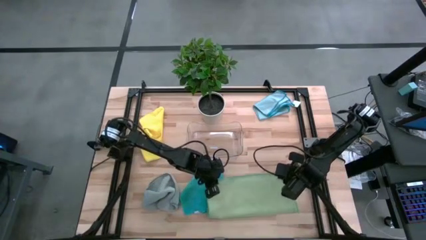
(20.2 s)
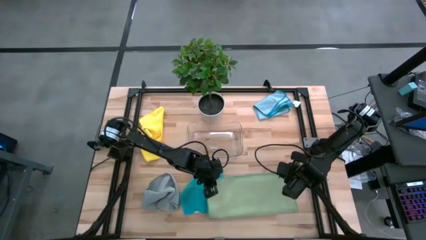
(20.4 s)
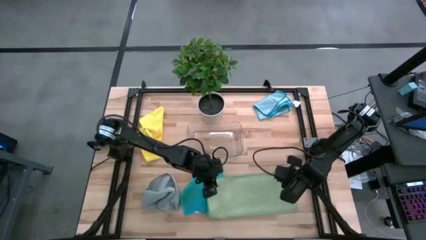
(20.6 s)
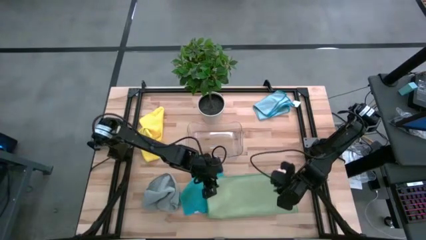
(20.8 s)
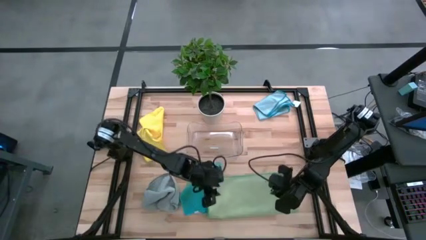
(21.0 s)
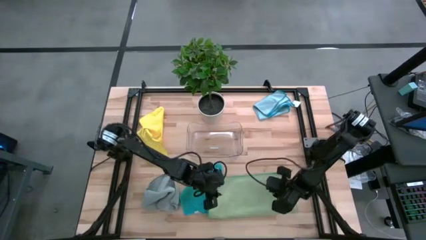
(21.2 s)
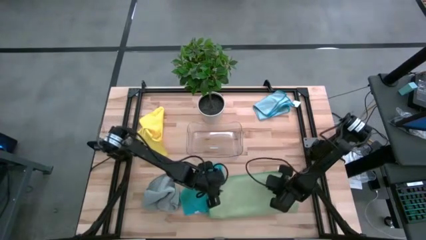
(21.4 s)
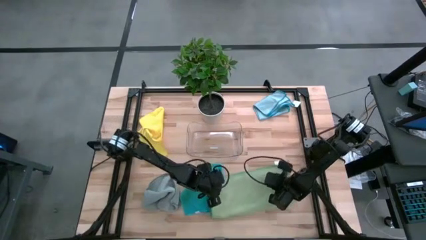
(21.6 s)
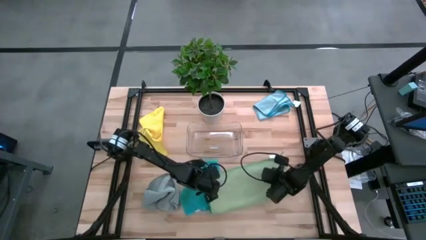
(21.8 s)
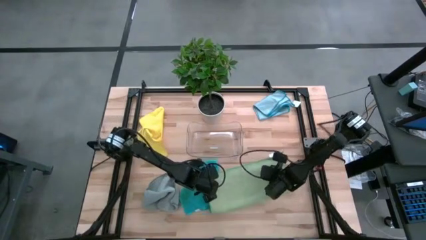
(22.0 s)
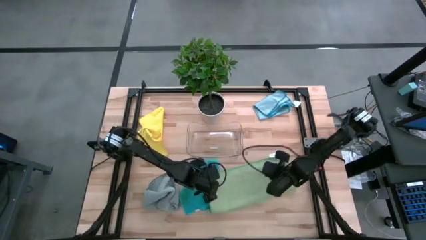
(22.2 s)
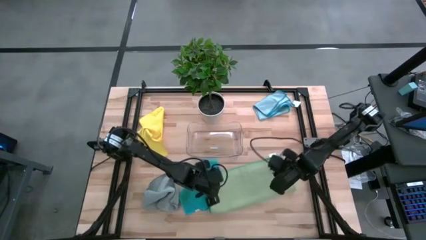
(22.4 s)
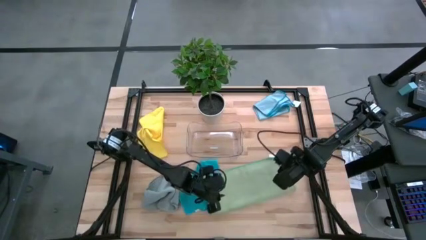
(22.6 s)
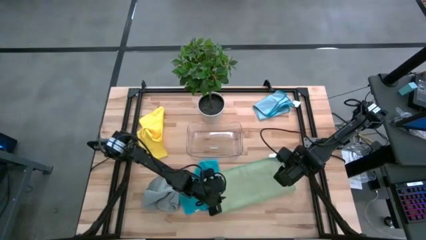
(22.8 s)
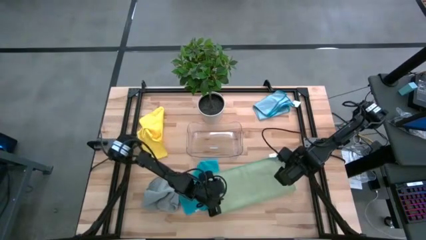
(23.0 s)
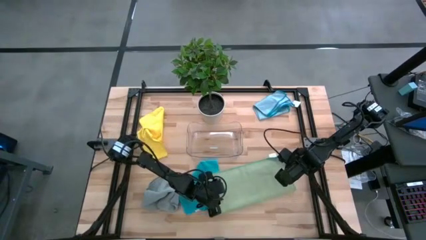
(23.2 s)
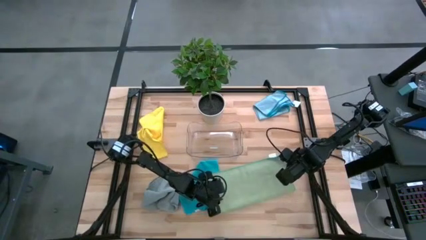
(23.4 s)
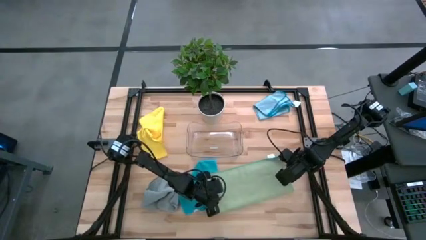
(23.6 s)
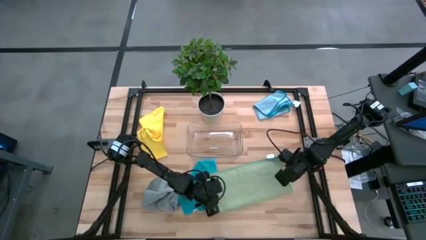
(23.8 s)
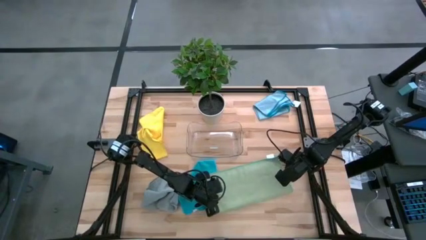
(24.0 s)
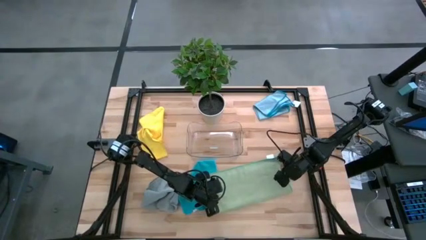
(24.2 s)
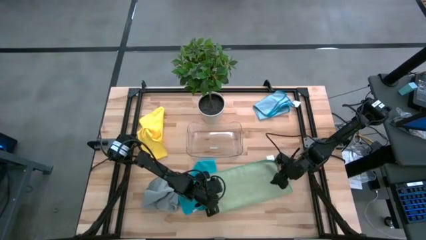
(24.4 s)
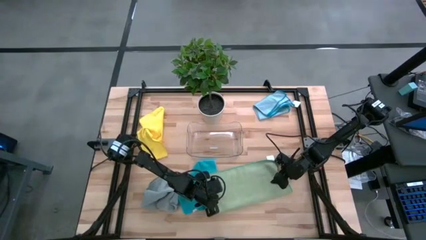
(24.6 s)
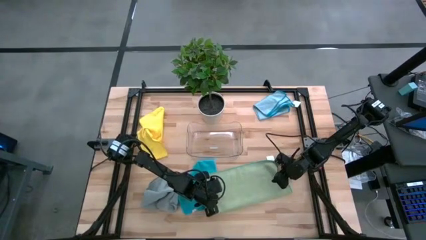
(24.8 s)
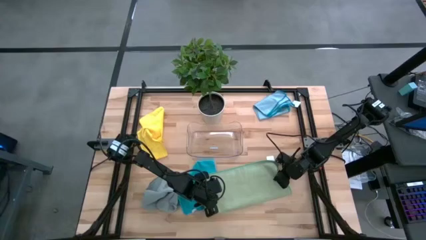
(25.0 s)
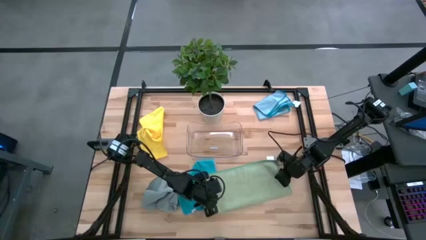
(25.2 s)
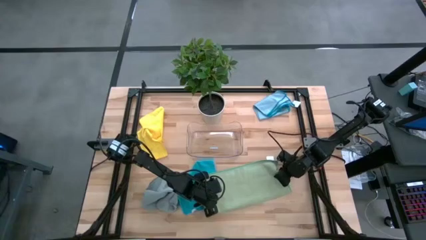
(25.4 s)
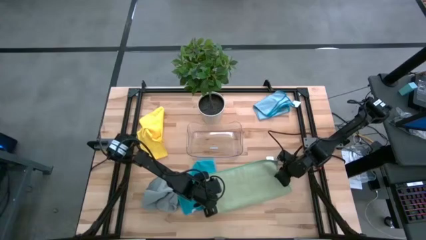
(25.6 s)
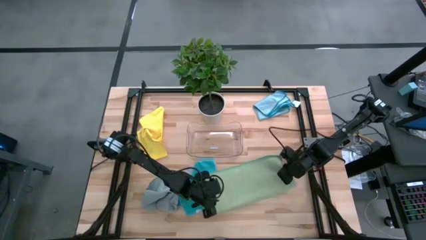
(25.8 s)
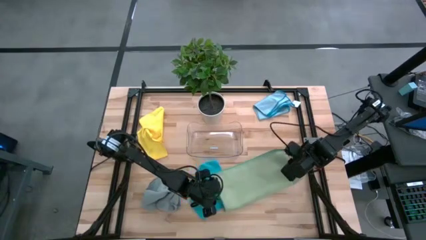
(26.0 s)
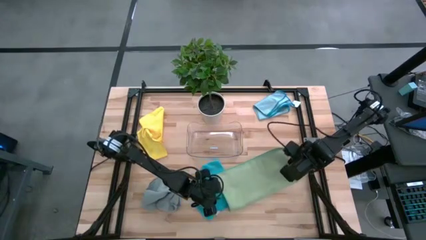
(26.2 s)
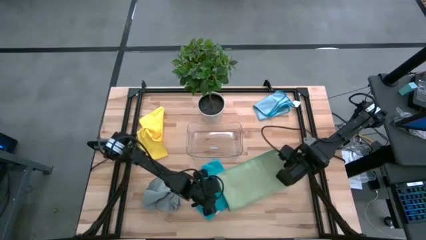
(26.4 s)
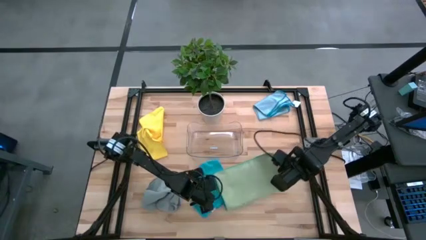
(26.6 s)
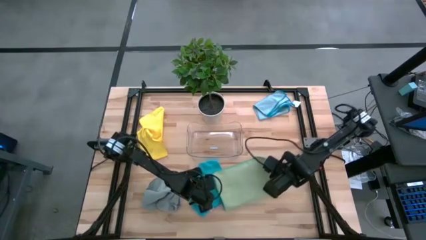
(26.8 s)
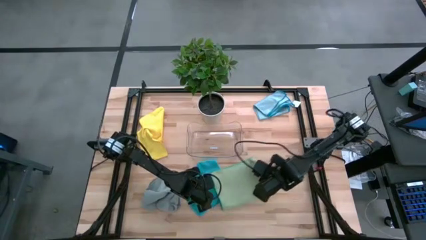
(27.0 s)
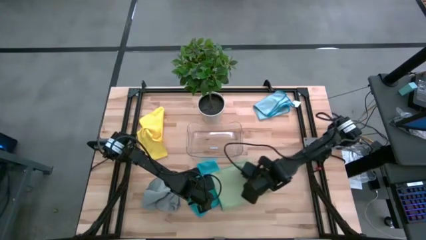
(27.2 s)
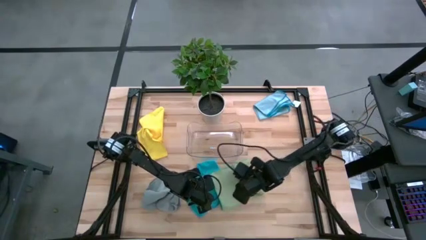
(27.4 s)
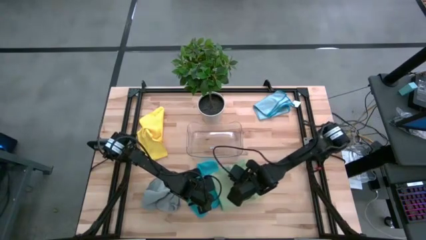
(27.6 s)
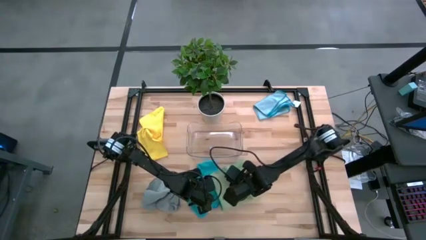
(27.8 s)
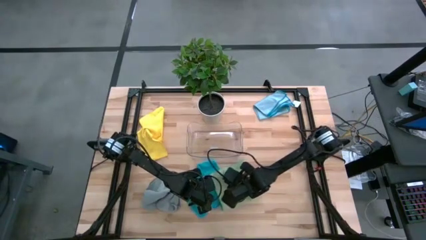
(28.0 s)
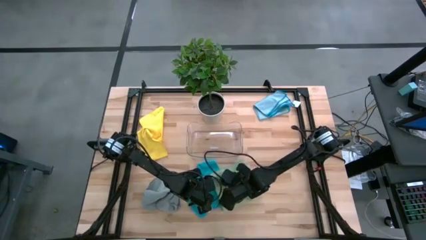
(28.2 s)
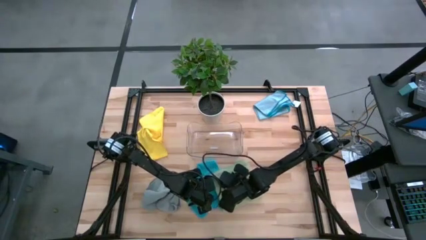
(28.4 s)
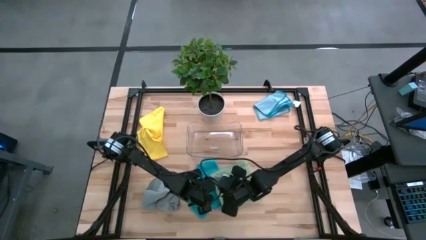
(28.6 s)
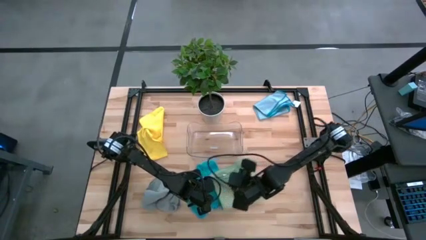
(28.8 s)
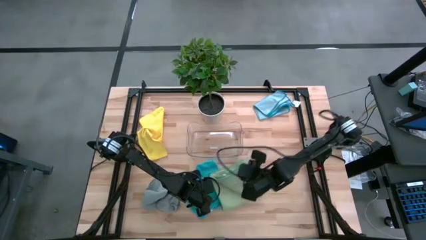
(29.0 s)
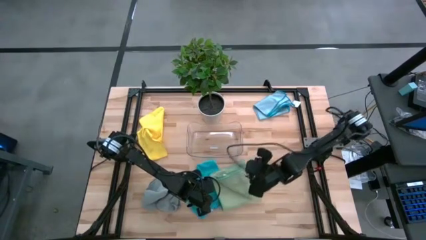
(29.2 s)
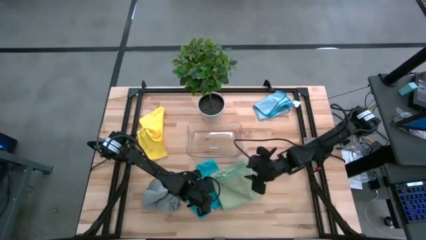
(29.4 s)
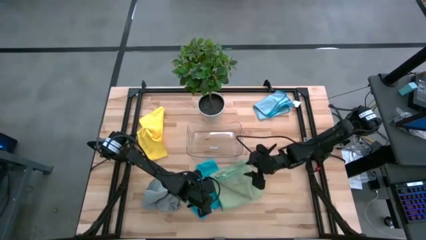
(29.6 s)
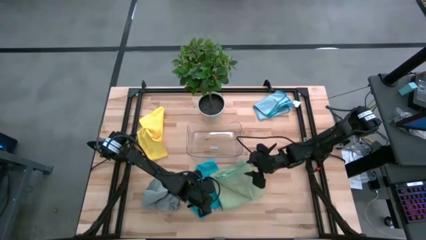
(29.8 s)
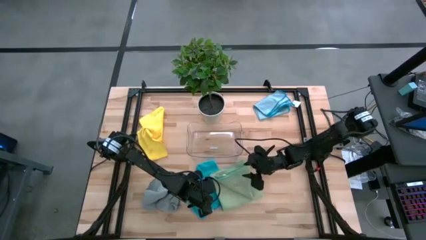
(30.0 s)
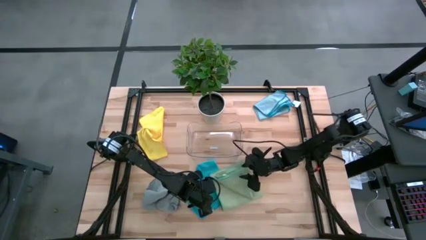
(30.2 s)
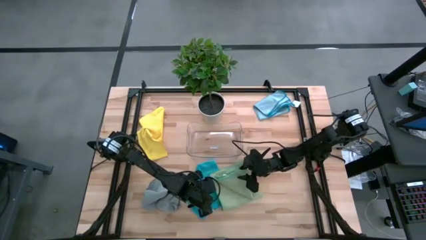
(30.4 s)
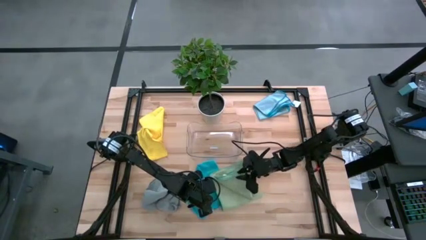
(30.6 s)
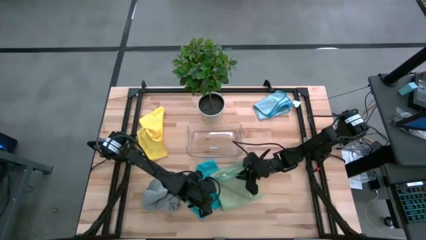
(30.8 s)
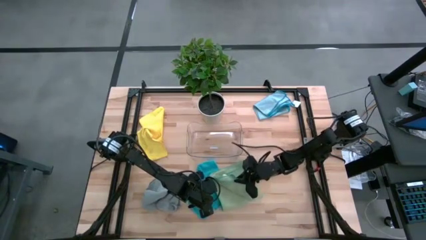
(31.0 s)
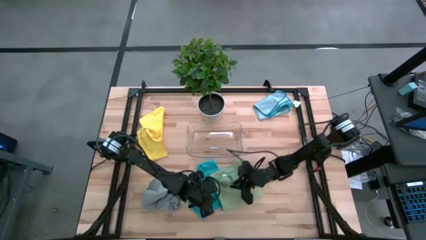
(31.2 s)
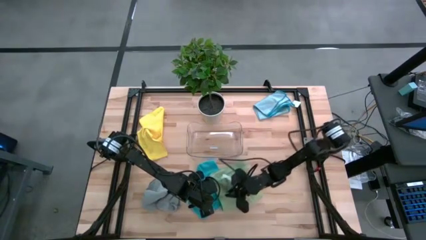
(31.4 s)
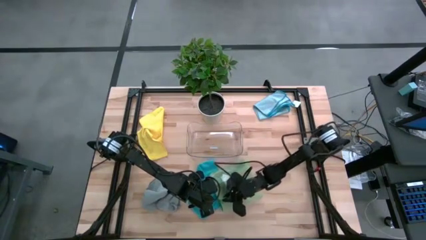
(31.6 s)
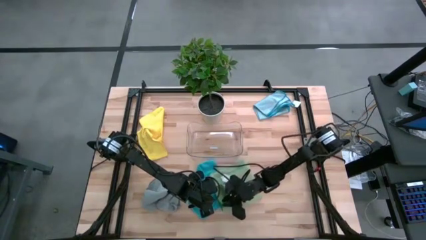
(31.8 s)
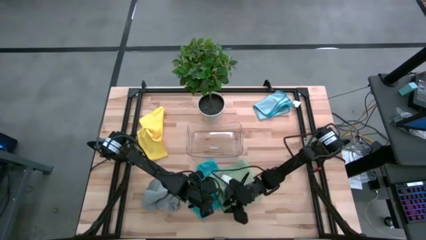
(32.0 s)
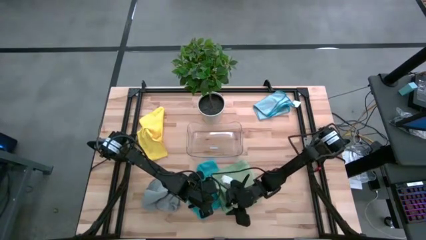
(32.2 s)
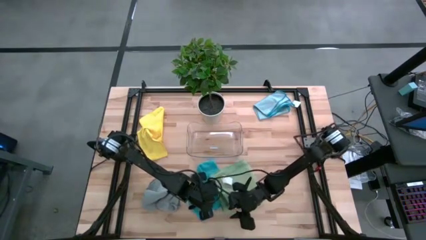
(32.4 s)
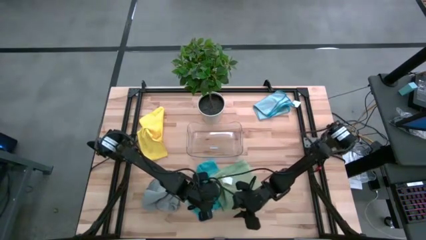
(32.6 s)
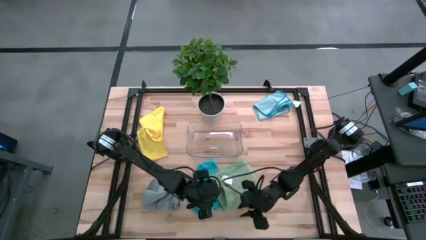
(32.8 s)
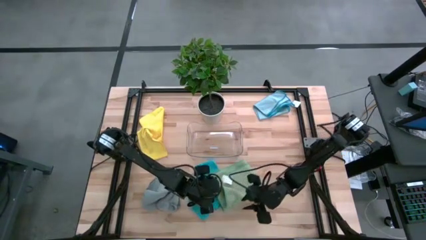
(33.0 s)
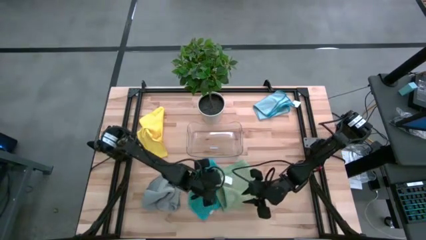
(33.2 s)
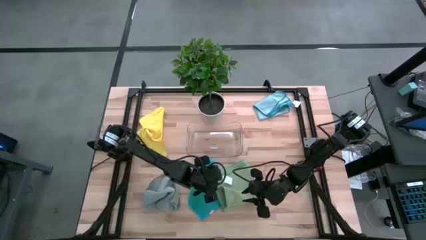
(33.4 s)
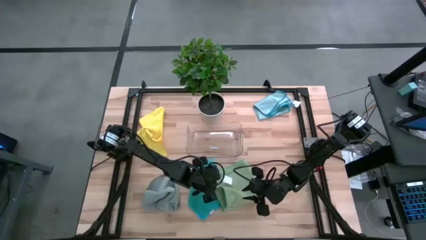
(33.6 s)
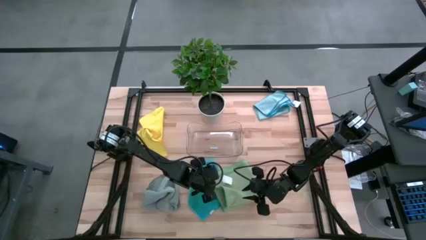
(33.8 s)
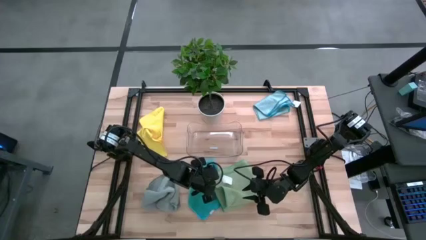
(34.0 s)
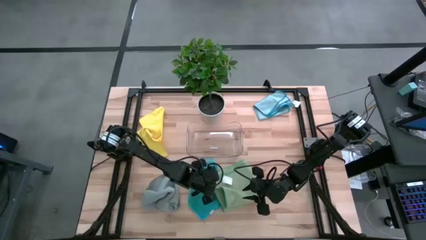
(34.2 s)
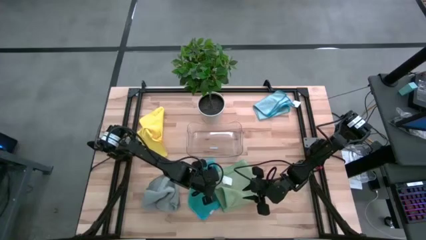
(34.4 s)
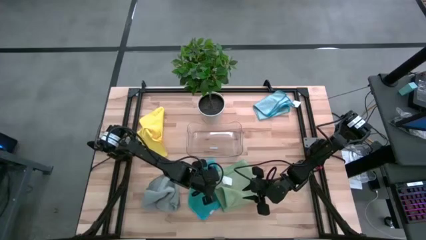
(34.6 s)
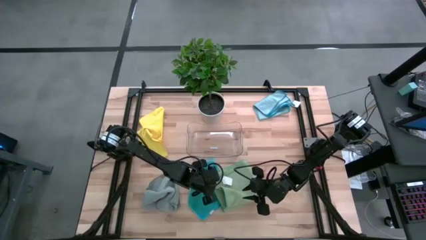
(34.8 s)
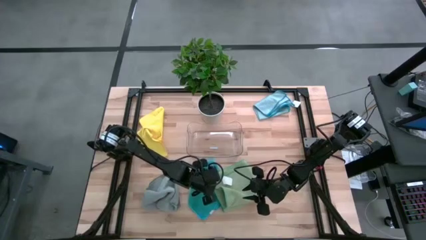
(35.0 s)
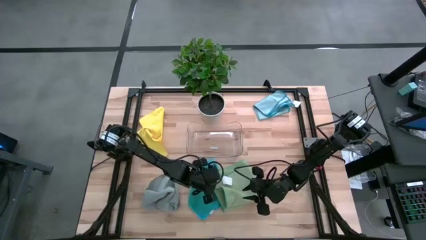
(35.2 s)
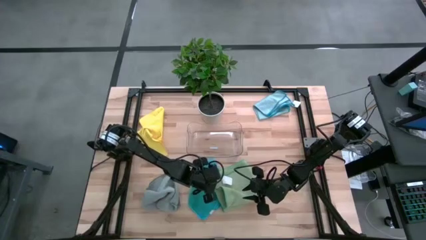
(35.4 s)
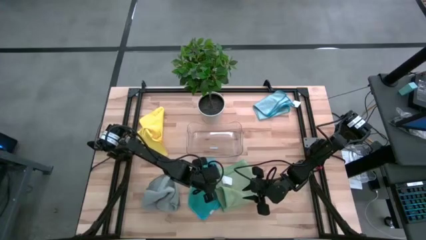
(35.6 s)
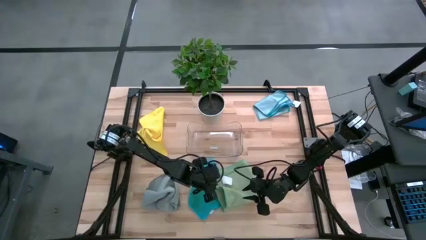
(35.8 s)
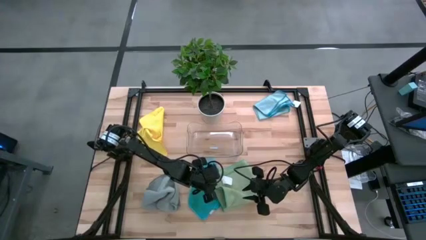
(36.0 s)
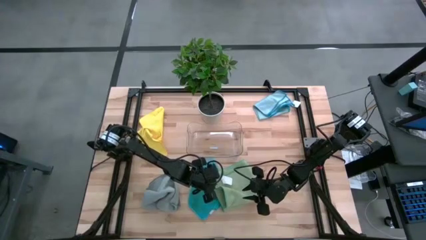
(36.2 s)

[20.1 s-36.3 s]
Task: Fold microfiber towels
Fold the green microfiber cloth
